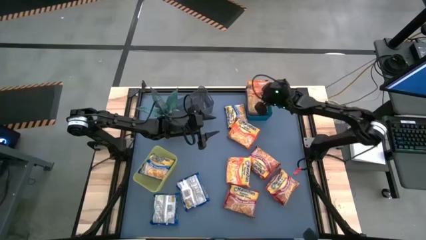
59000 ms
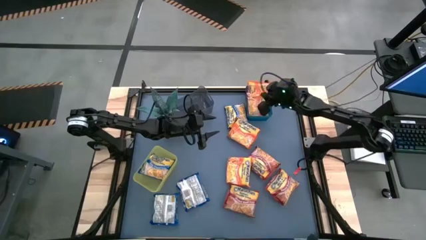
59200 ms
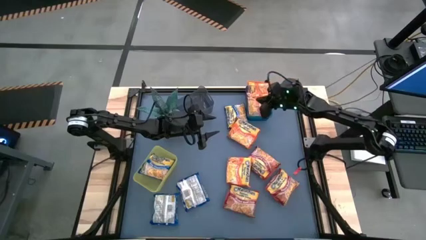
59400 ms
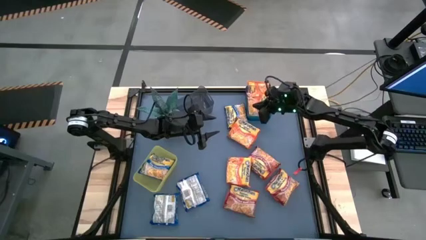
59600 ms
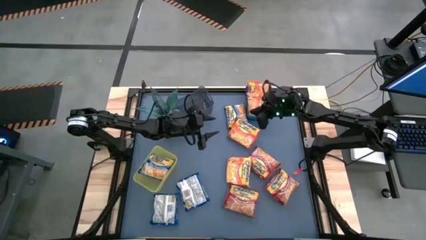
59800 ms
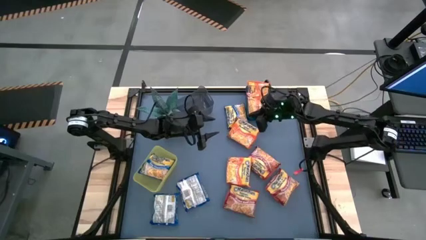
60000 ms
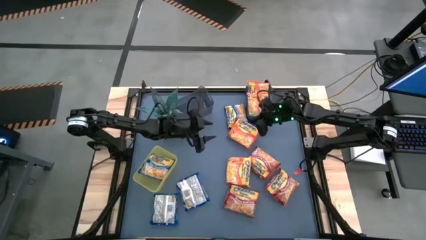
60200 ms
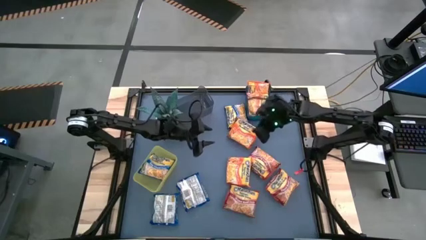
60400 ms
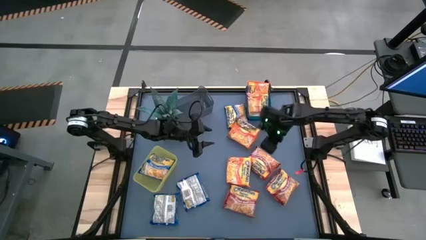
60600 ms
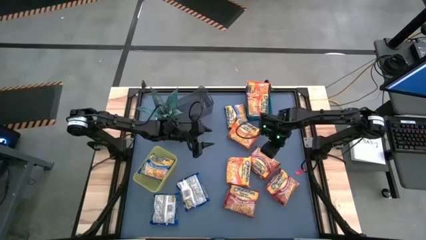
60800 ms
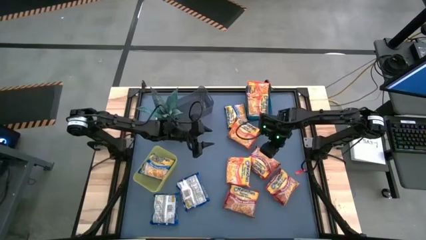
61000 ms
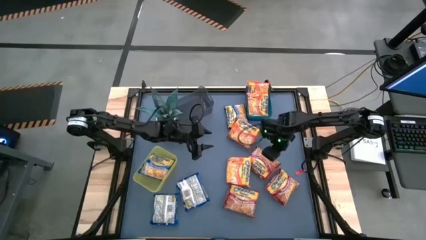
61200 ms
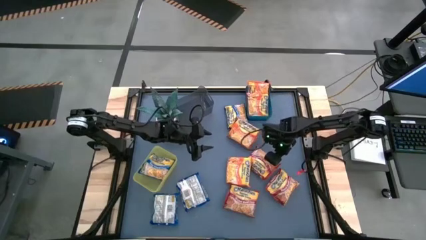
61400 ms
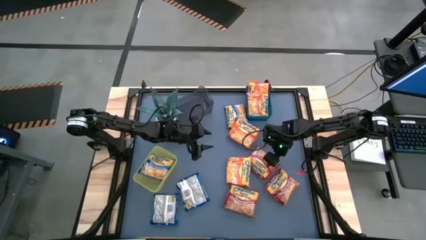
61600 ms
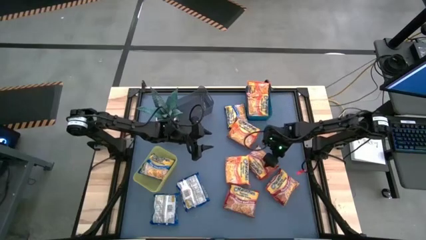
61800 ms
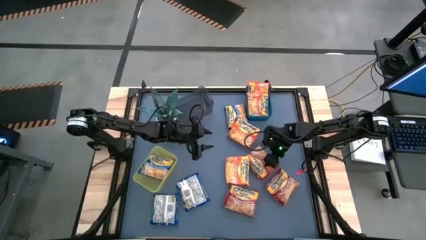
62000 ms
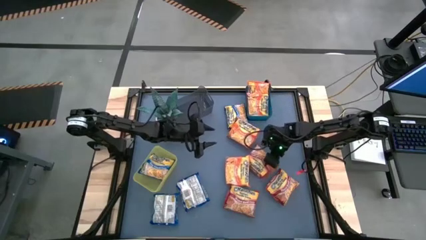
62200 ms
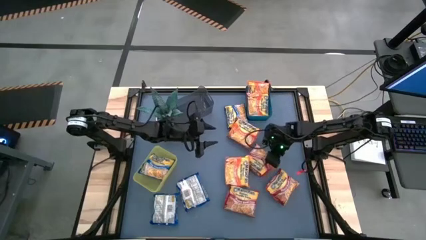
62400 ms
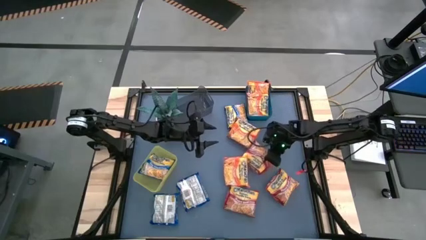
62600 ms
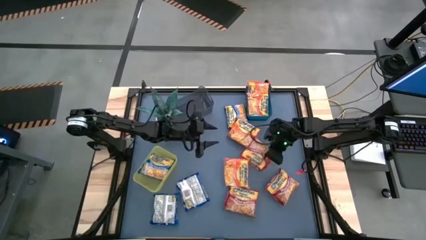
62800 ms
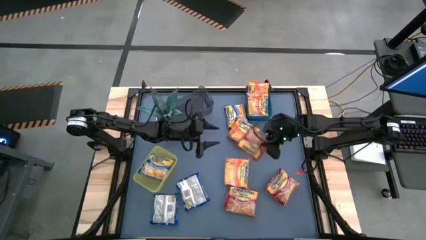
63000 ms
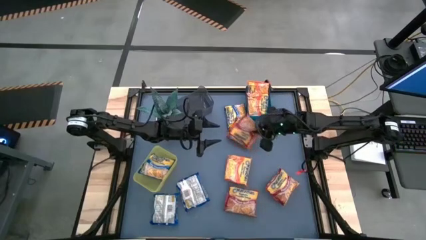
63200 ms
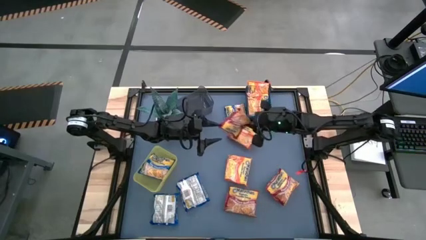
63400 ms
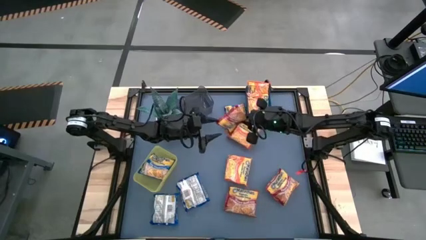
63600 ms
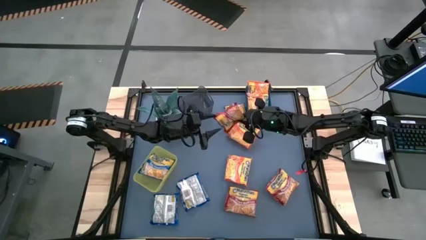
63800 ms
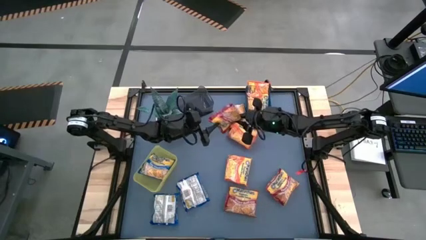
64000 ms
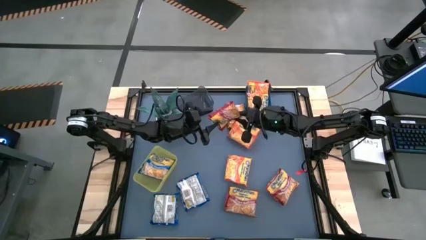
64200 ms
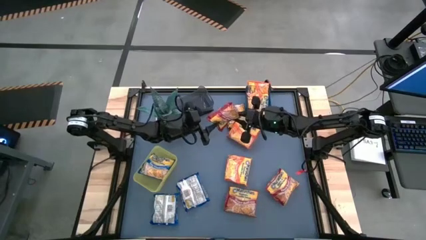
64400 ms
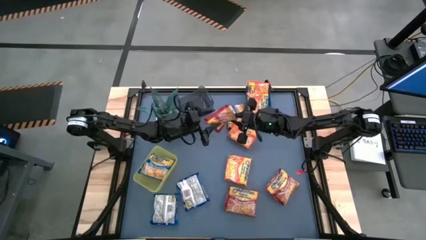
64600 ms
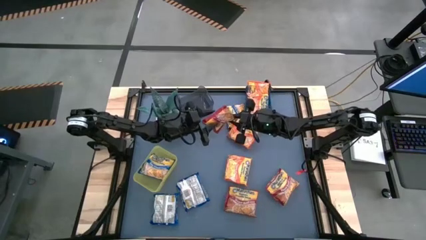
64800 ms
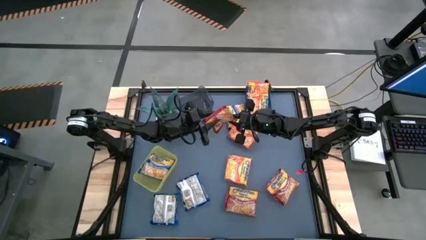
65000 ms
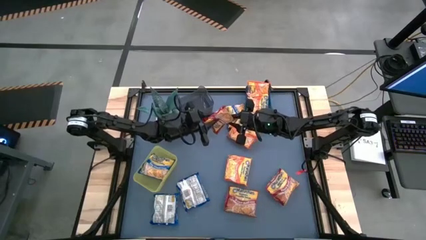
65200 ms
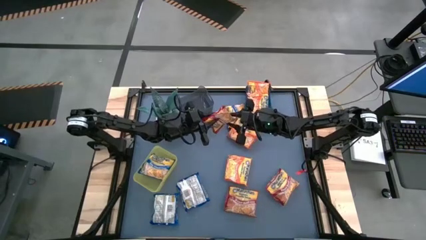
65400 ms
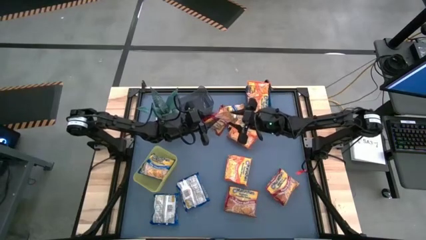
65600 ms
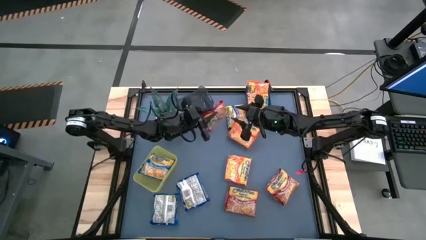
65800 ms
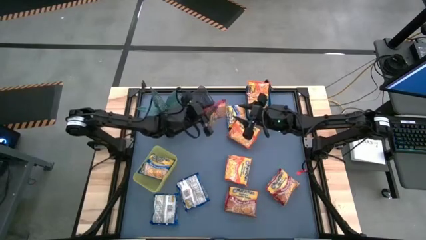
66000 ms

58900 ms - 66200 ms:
Task: Sort Maruchan noodles
Put the red noodle pack into the black bin

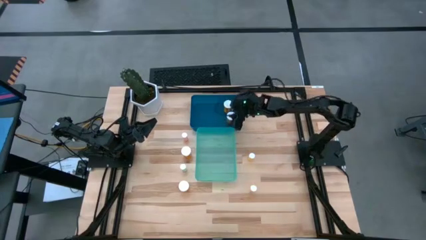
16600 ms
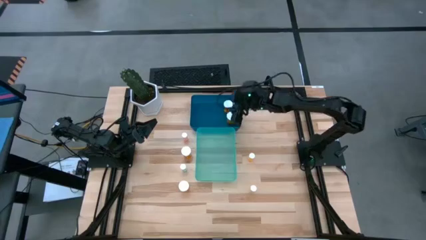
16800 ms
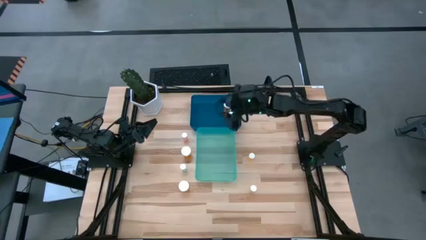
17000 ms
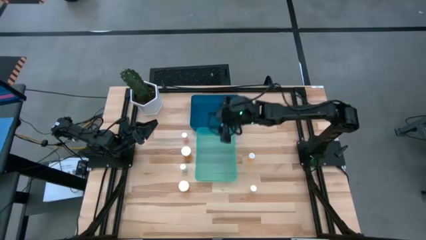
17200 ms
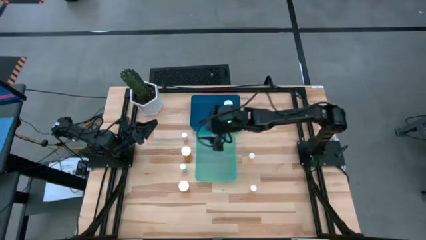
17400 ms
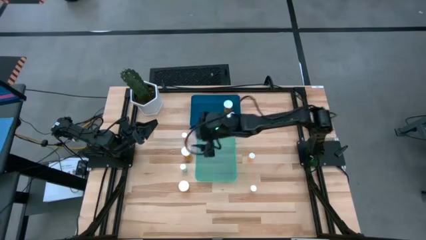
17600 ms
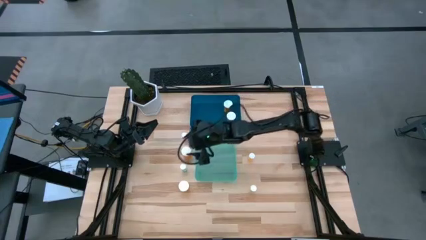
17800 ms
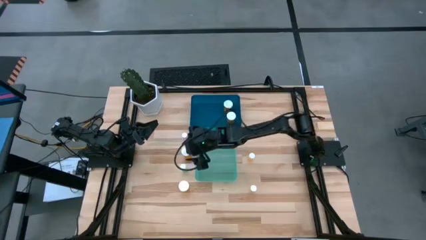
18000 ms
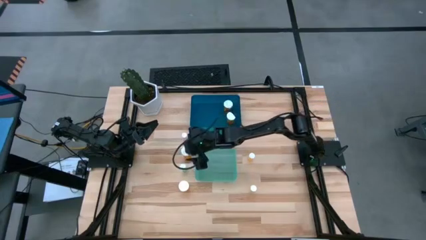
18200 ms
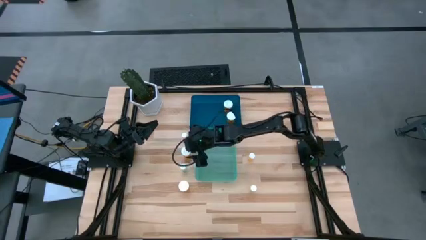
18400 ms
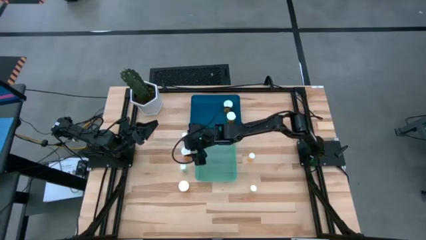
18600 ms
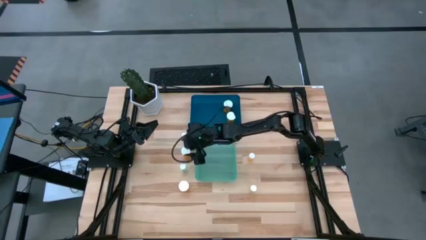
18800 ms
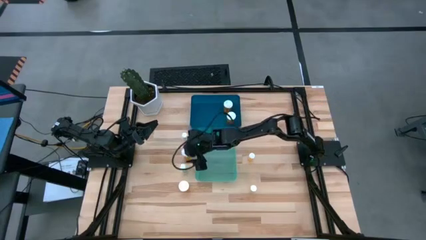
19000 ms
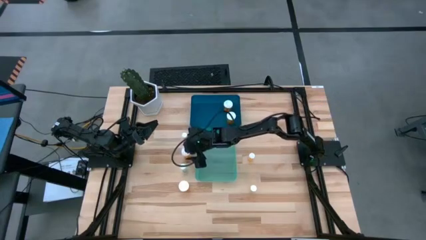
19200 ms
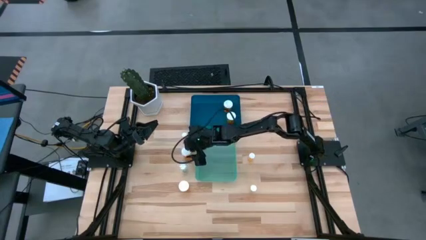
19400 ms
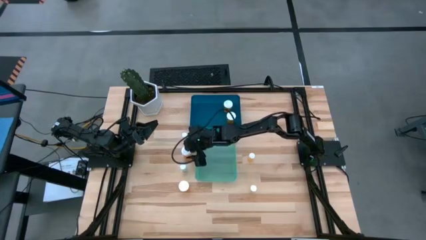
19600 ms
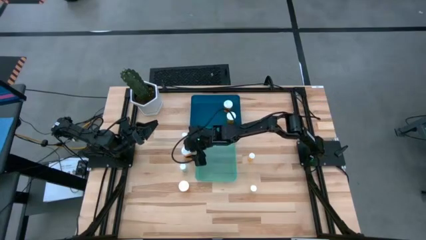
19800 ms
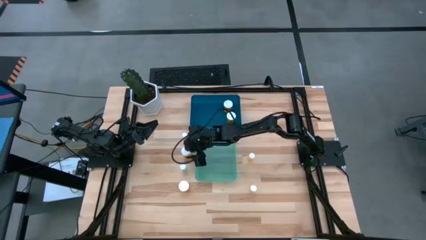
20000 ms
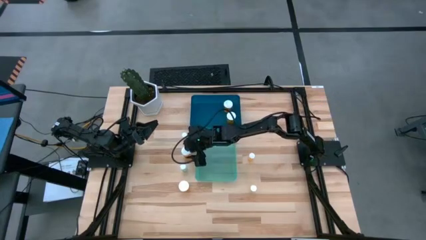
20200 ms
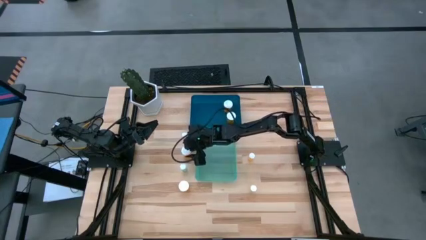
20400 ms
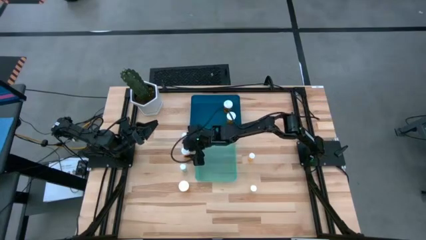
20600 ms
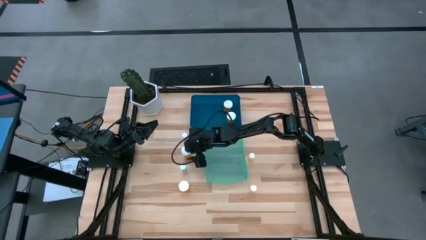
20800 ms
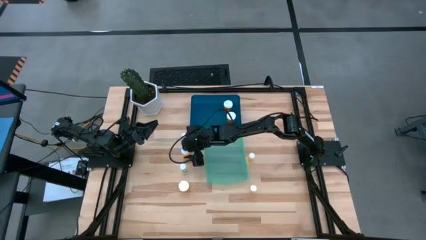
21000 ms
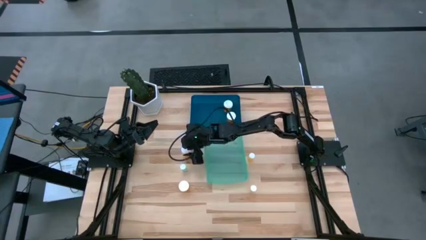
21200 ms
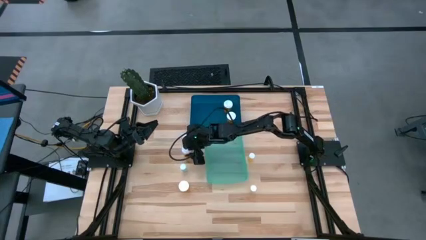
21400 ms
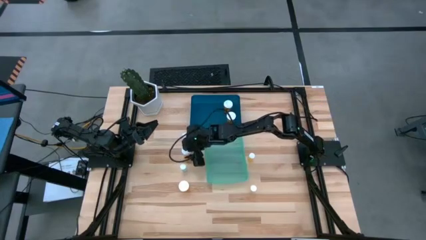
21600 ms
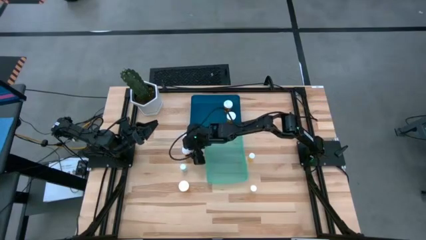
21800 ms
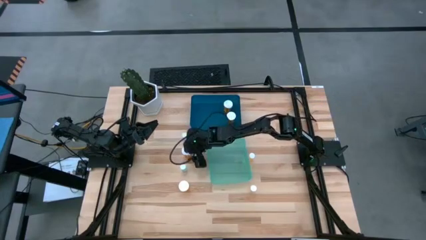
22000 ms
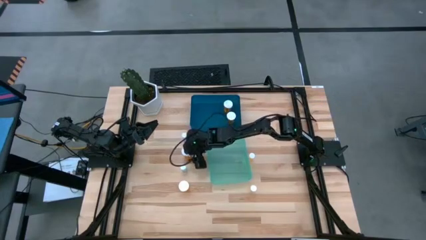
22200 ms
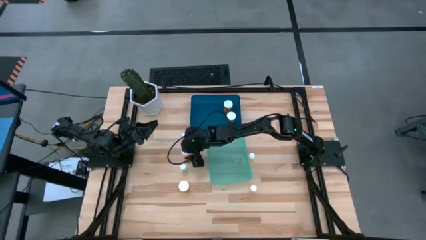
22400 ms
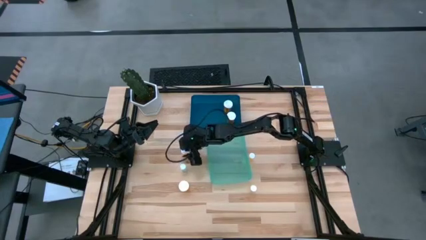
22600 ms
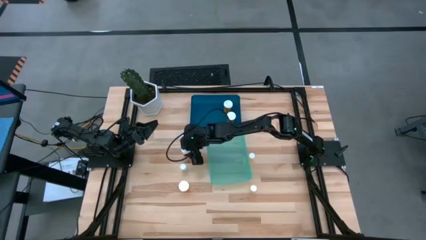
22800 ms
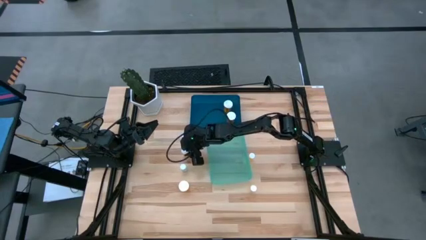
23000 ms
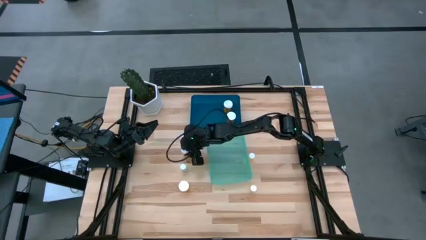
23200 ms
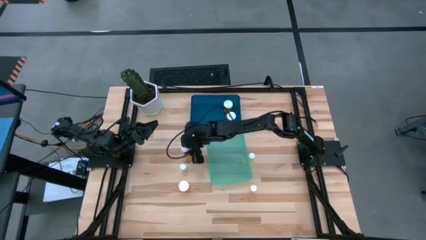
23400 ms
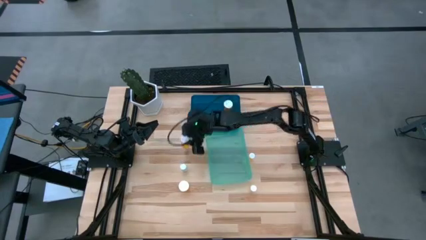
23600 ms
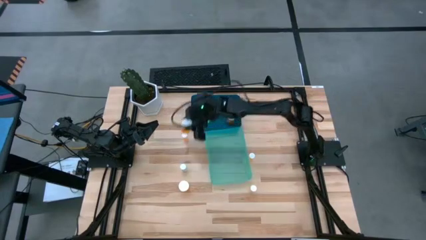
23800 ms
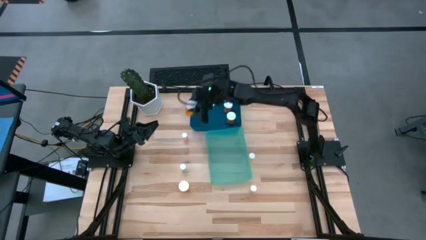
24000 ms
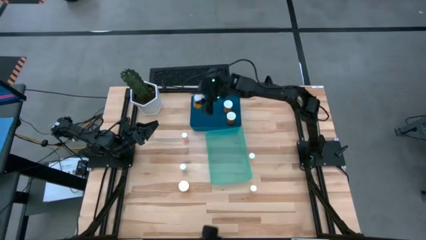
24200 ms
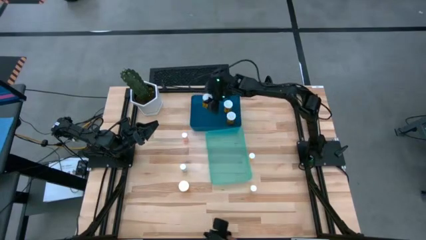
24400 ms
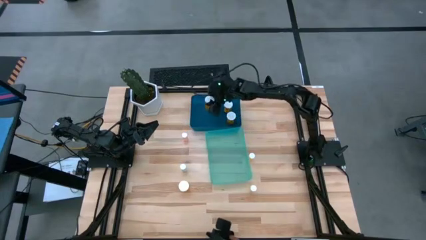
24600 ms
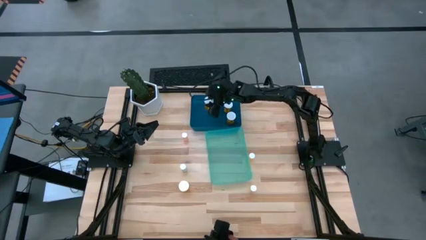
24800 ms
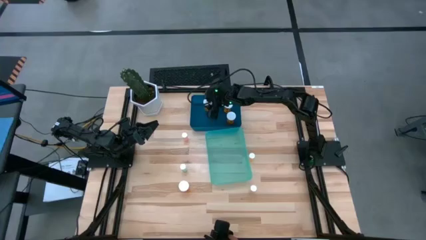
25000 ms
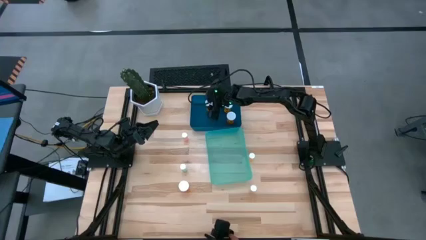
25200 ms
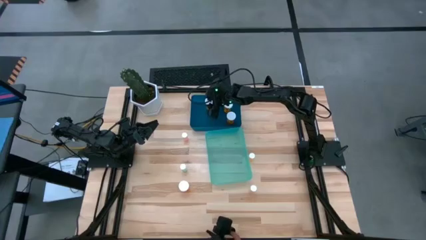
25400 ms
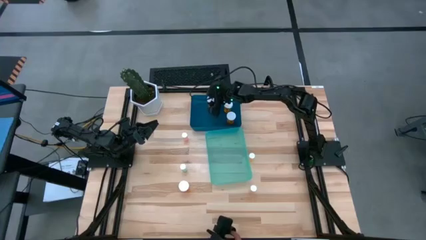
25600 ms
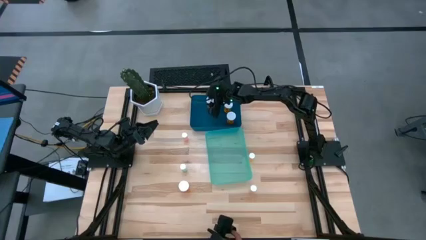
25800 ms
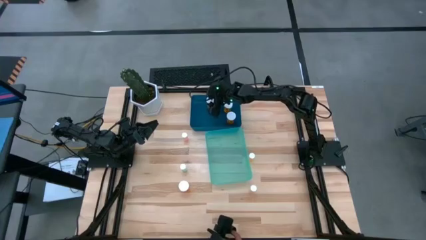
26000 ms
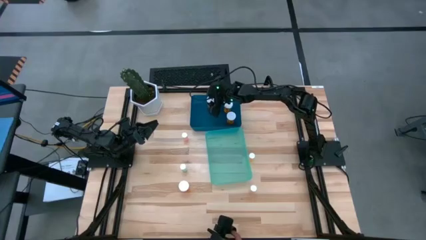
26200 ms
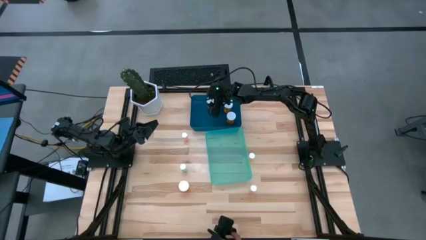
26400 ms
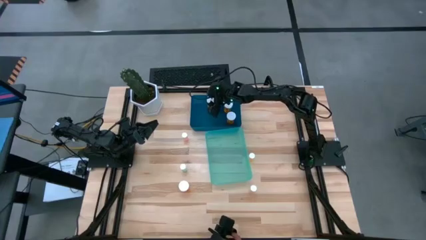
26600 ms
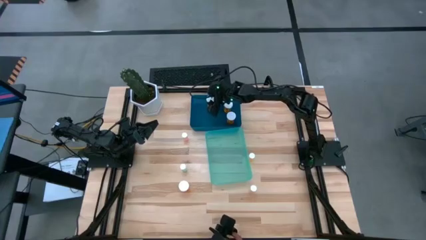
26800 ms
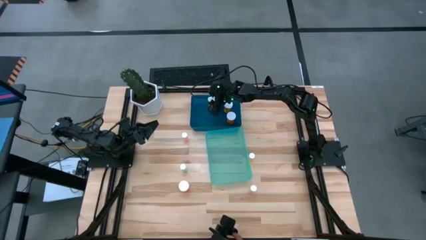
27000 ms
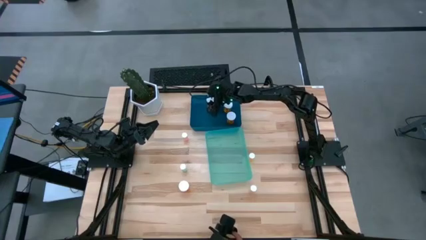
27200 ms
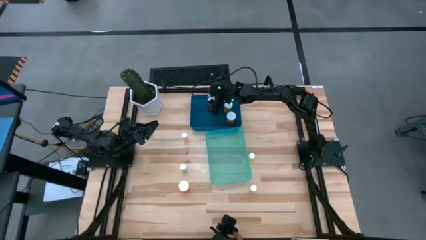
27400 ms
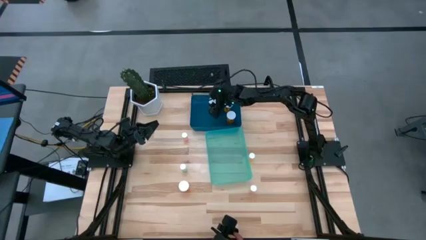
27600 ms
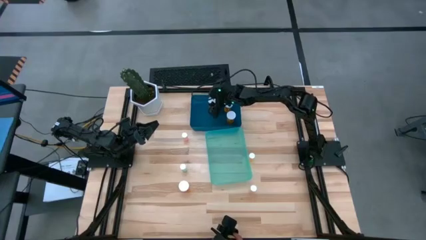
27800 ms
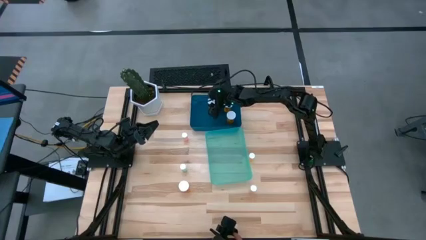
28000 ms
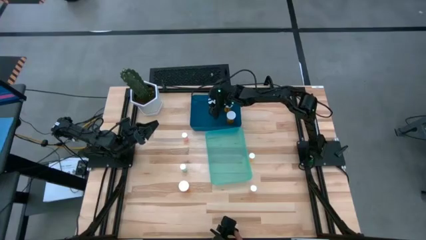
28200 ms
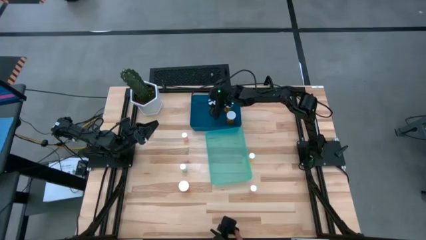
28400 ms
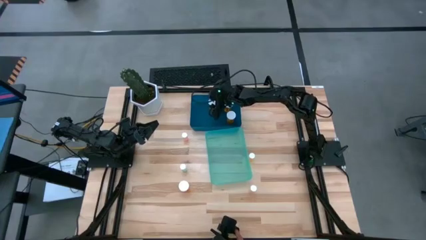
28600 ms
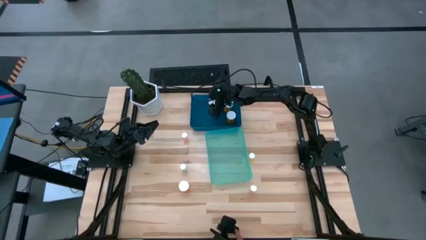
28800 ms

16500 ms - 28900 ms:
Task: Pick and place medicine bottles into bin by pill shape (circle, oval)
Put the large orange pill bottle into the blue bin
